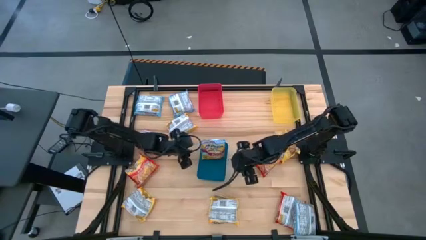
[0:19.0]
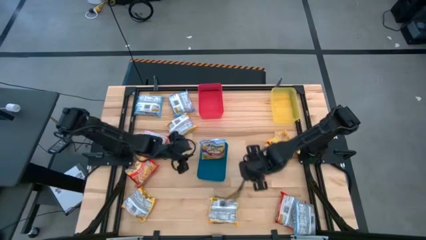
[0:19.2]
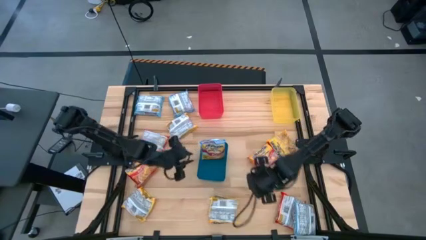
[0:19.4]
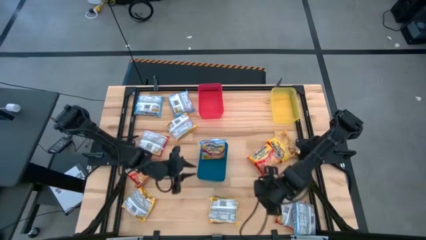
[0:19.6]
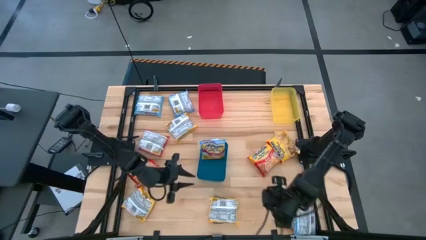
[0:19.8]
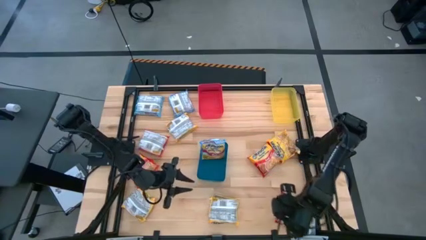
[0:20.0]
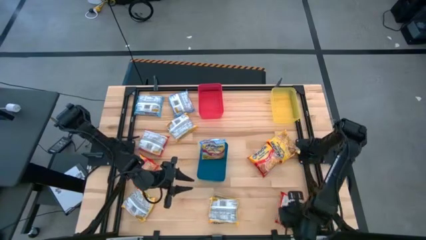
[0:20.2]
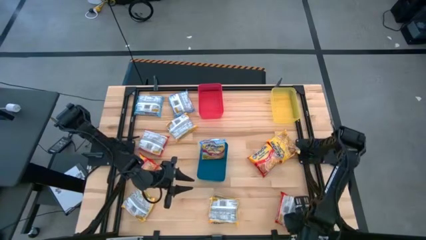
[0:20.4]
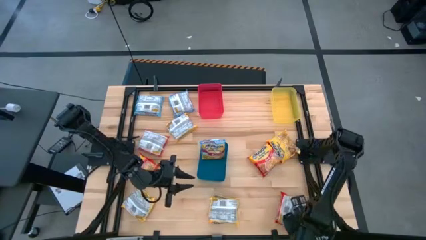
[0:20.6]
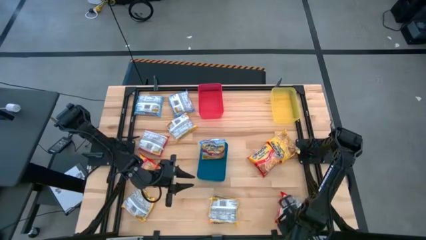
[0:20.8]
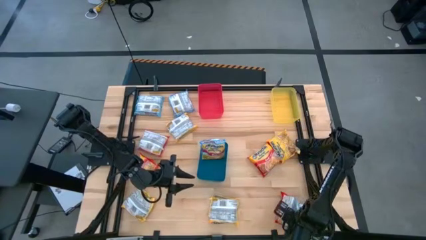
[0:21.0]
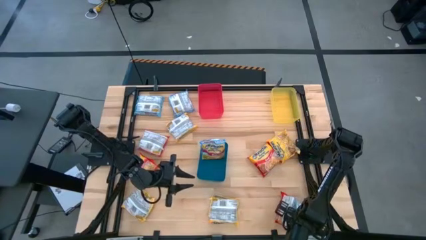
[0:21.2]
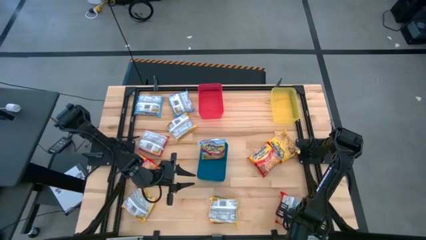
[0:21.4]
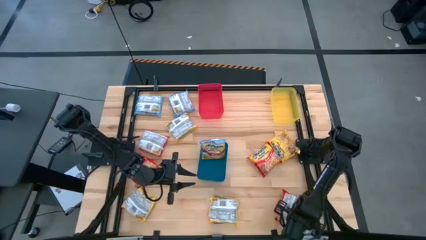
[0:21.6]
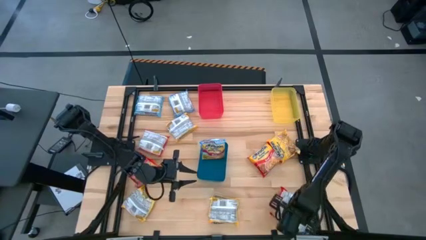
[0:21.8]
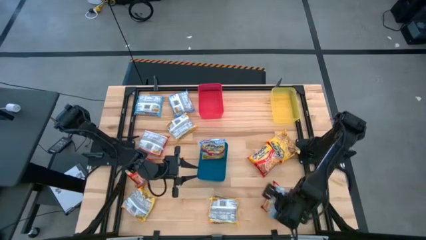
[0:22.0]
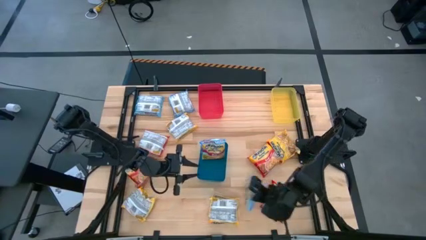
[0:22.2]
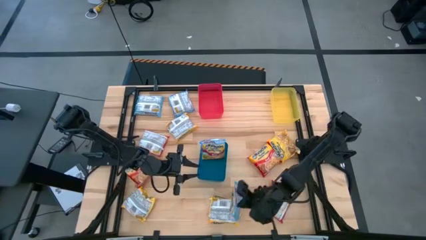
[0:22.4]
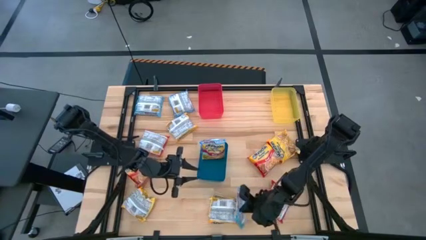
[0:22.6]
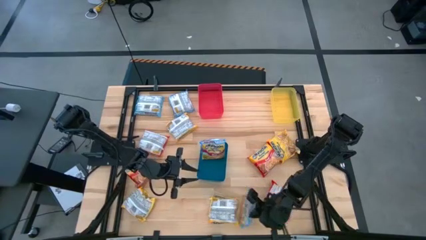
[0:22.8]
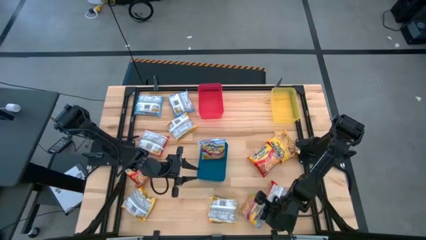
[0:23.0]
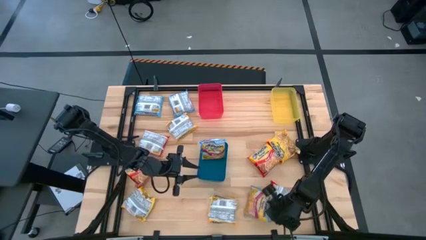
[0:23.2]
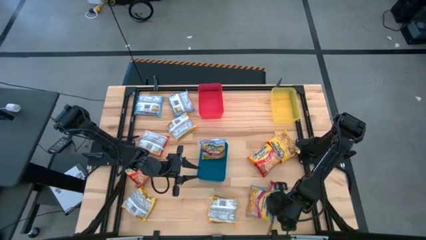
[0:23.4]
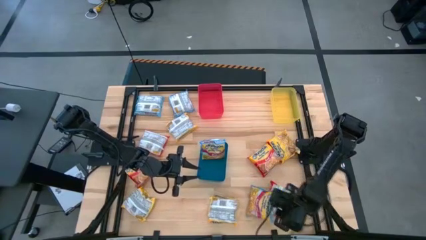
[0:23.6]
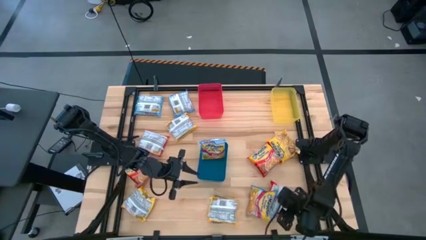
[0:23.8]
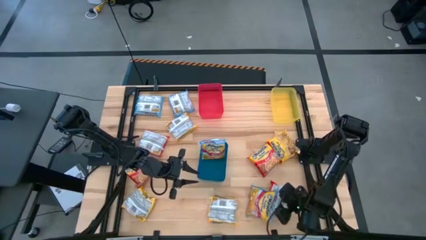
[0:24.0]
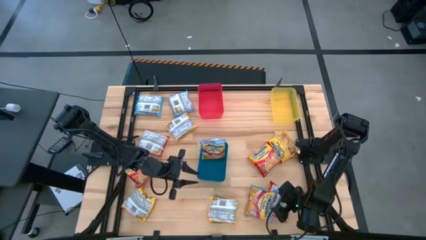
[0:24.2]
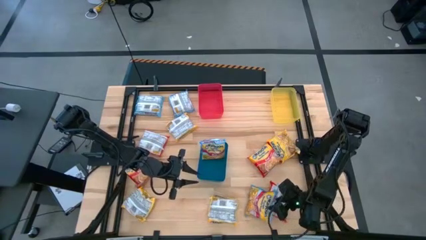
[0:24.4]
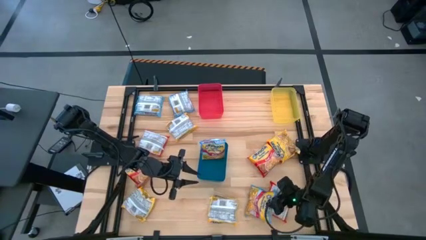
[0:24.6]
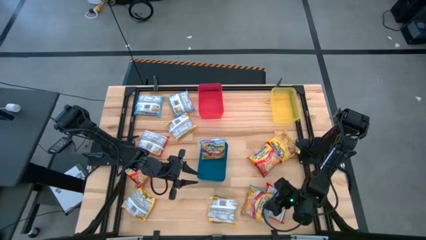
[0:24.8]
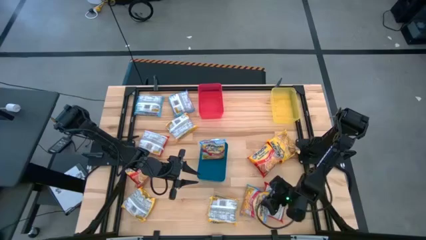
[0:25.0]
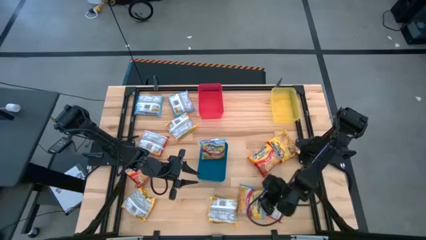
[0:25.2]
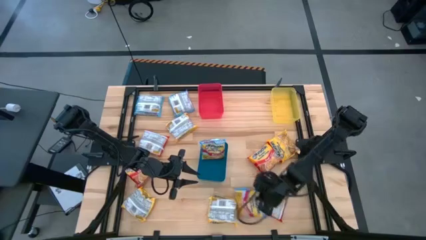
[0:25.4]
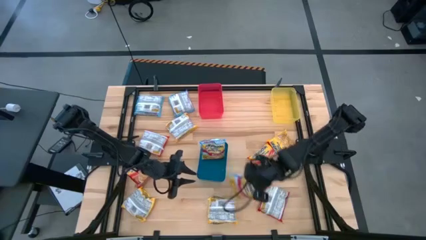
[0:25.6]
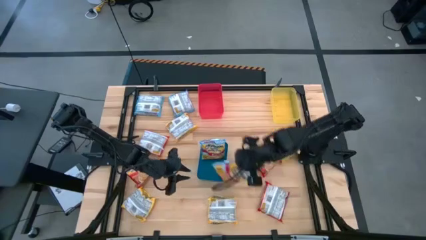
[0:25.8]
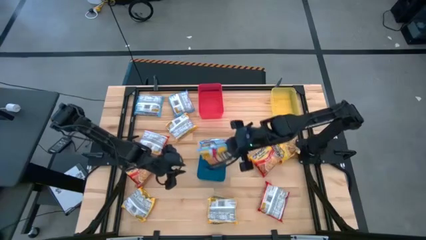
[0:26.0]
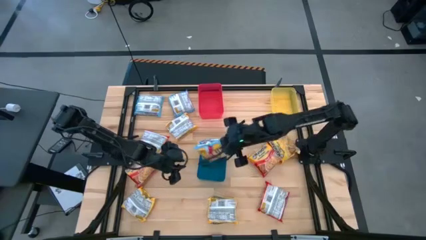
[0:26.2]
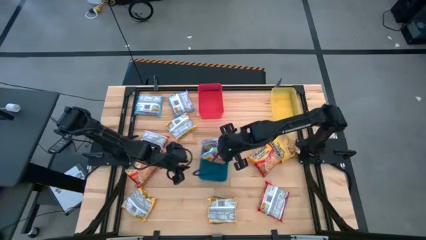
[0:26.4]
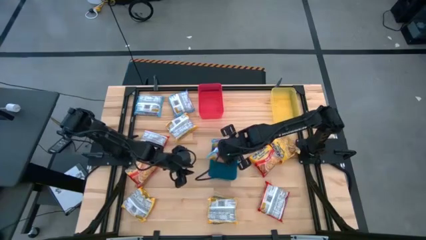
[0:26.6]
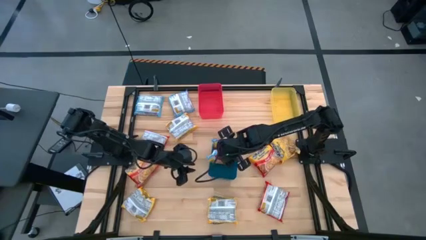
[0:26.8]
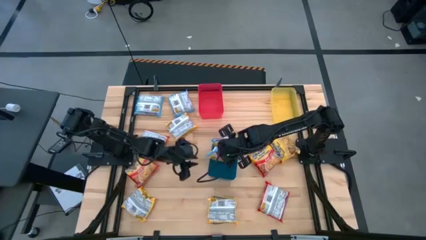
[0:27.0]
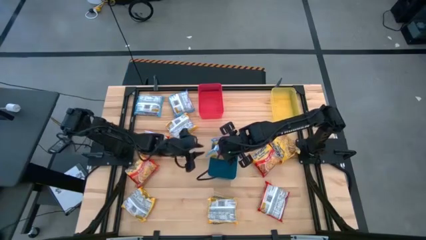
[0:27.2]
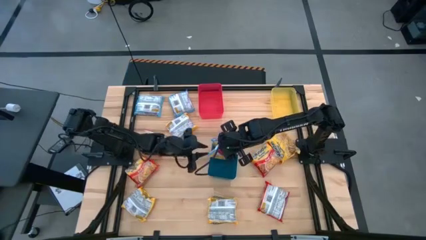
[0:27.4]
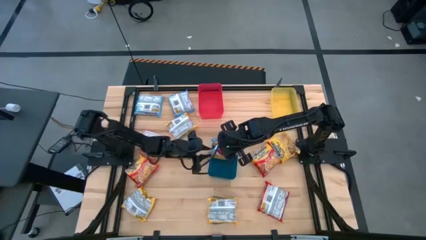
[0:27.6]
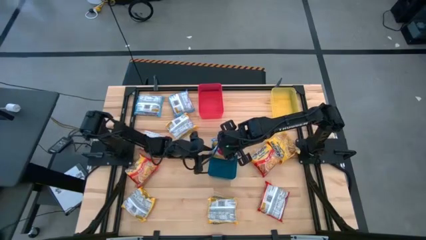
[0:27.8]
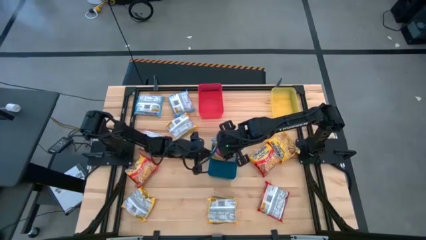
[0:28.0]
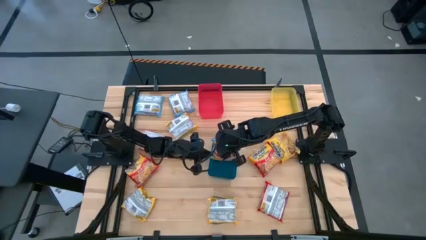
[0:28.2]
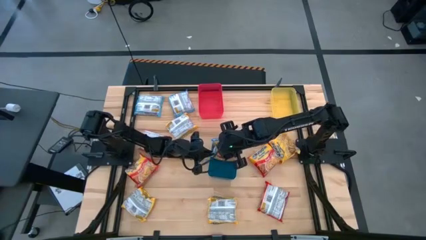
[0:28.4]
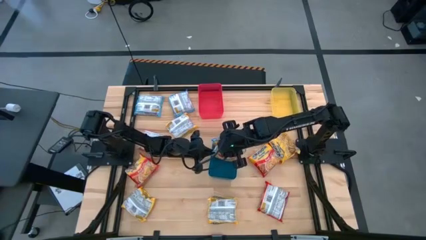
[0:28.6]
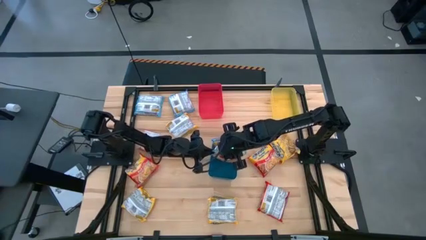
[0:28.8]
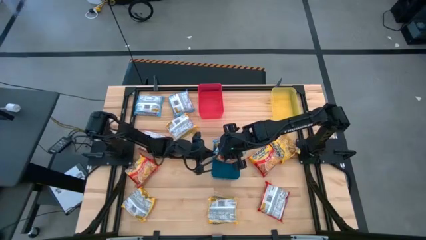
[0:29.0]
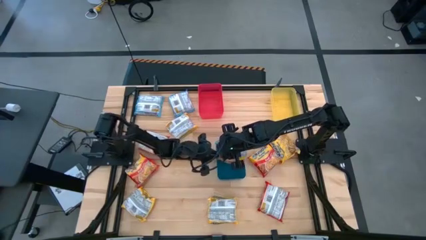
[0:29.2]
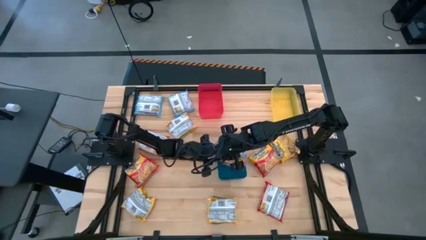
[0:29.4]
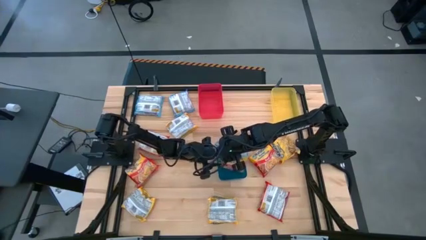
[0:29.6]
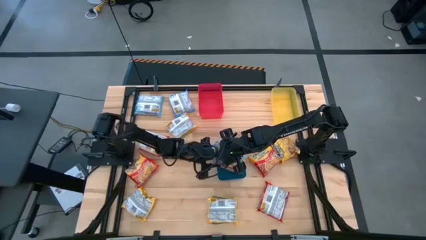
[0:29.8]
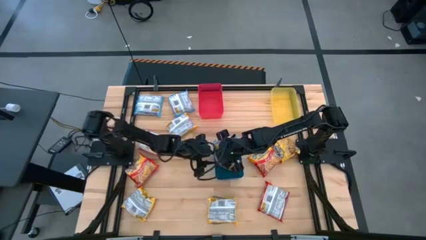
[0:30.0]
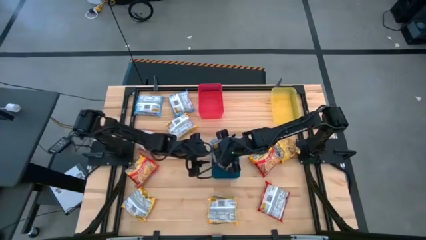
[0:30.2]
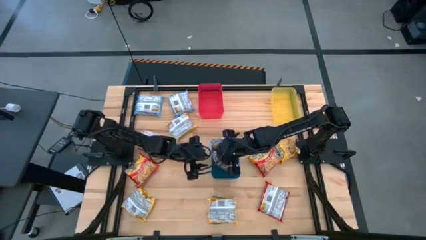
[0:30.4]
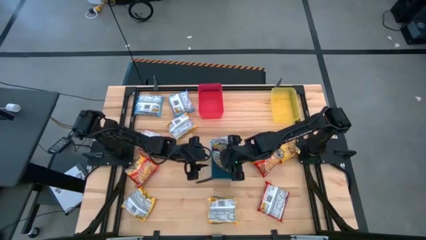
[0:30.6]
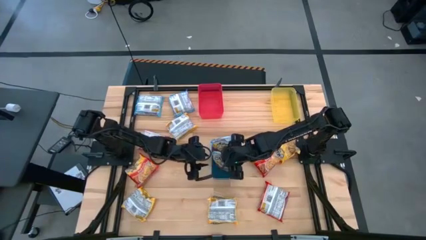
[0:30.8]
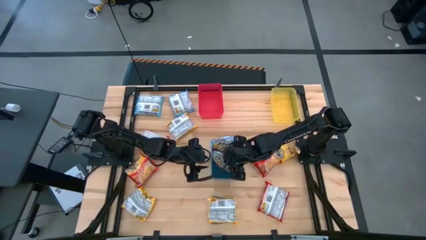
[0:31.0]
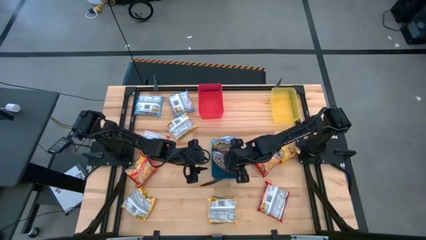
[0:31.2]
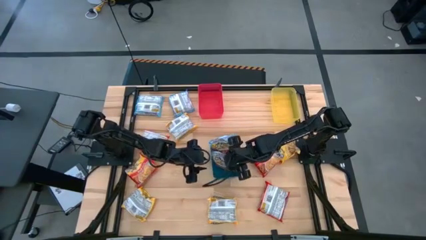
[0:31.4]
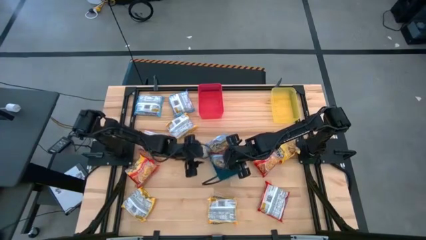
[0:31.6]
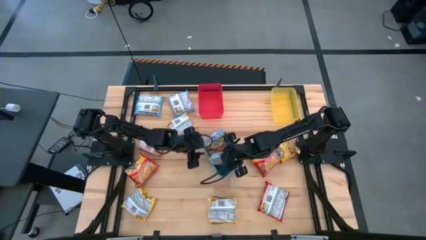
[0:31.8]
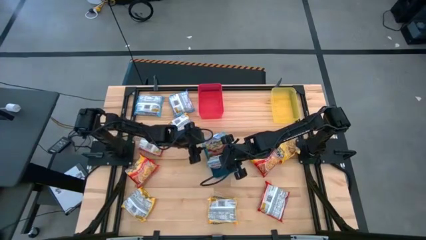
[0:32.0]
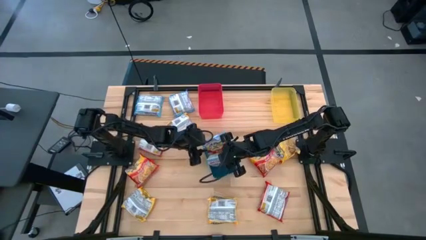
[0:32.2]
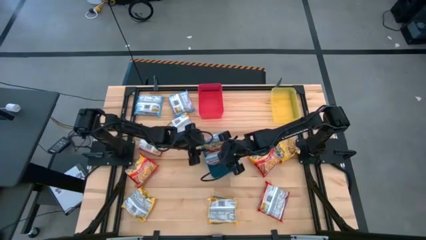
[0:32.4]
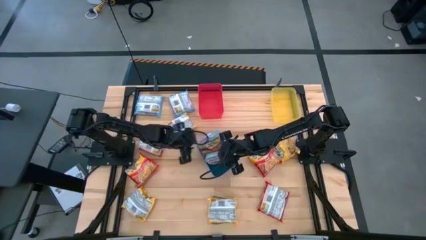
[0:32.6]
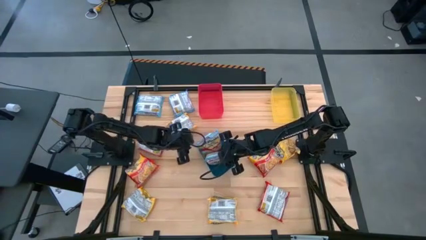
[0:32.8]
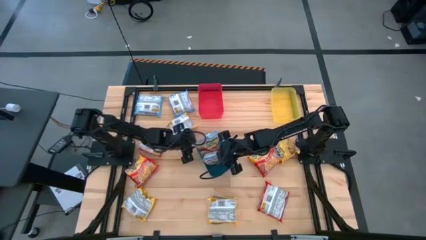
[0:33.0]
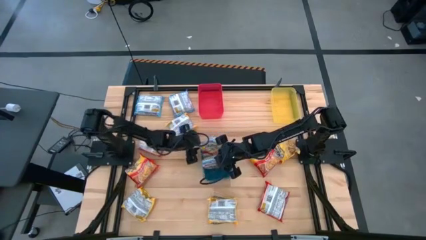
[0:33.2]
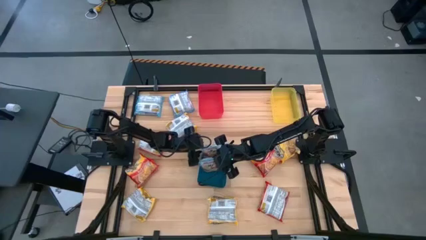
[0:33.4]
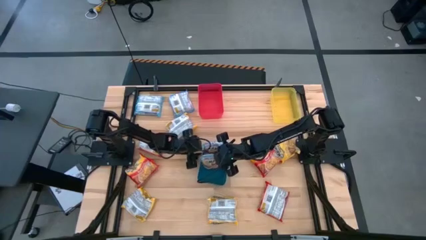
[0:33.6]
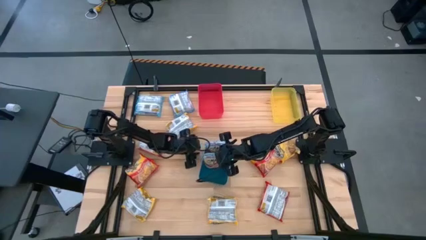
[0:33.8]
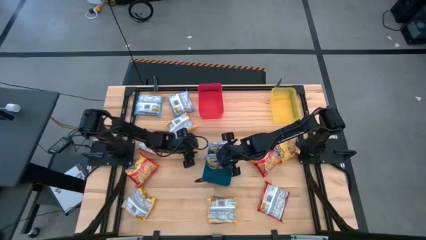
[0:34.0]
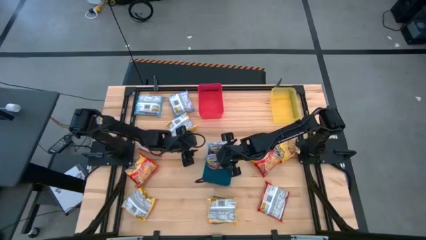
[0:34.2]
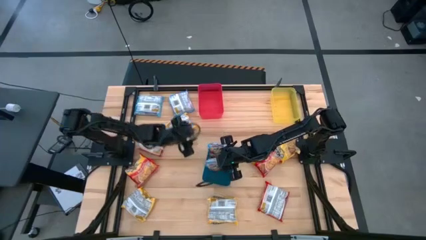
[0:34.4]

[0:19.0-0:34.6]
Task: Sort Maruchan noodles
Put the blue noodle pack into the blue bin
